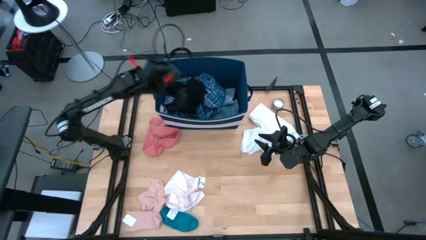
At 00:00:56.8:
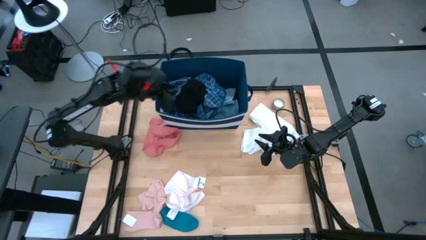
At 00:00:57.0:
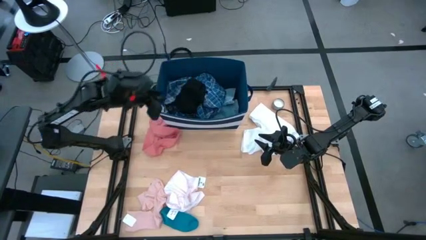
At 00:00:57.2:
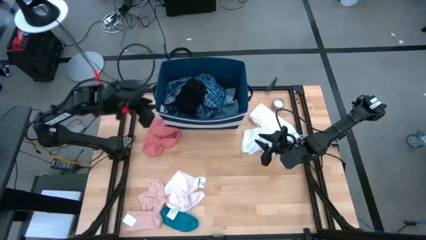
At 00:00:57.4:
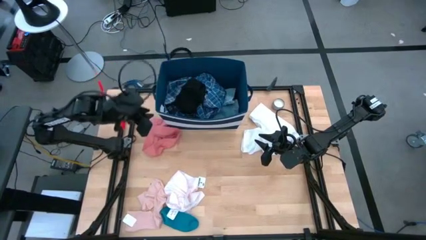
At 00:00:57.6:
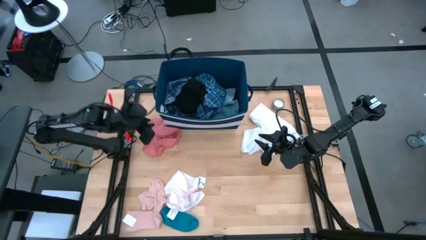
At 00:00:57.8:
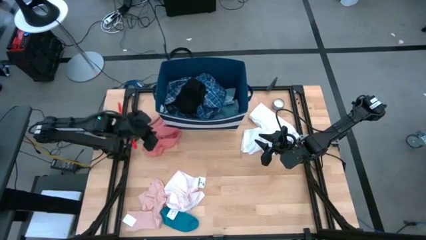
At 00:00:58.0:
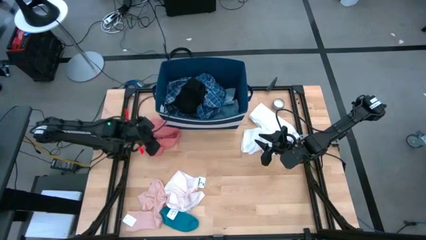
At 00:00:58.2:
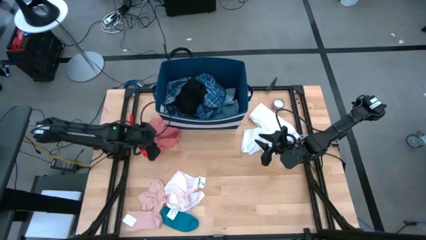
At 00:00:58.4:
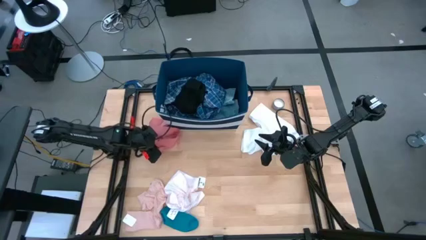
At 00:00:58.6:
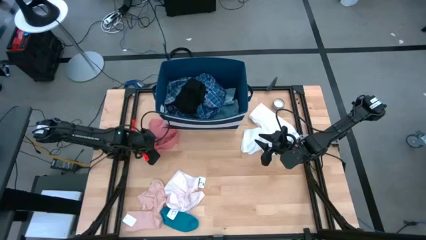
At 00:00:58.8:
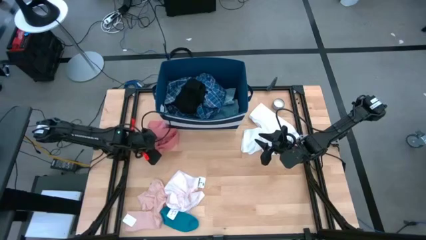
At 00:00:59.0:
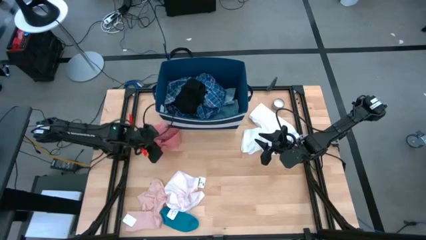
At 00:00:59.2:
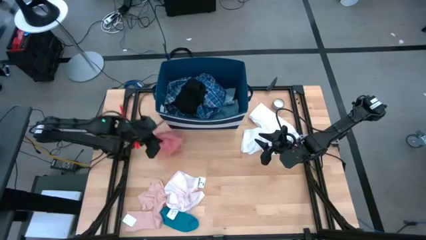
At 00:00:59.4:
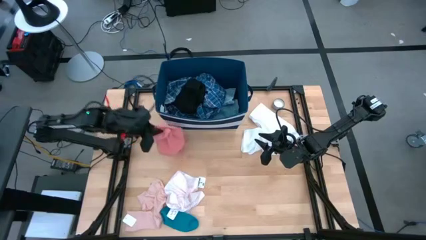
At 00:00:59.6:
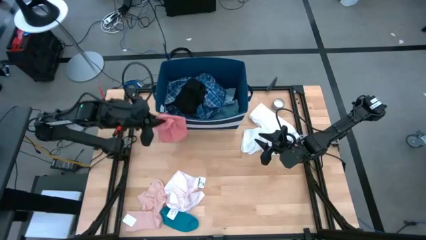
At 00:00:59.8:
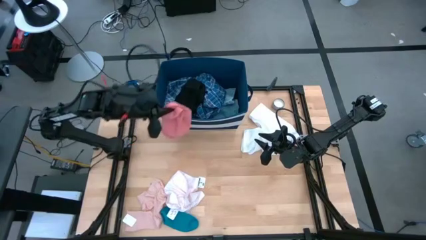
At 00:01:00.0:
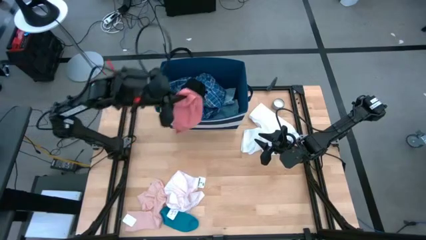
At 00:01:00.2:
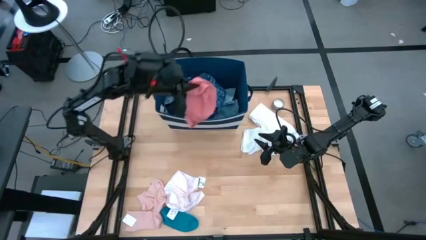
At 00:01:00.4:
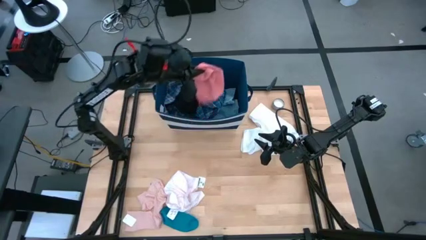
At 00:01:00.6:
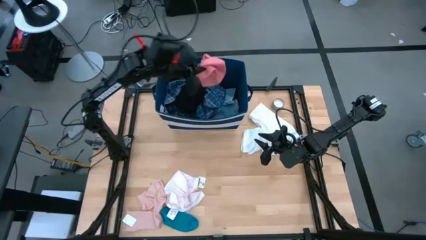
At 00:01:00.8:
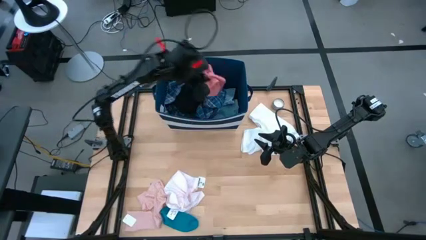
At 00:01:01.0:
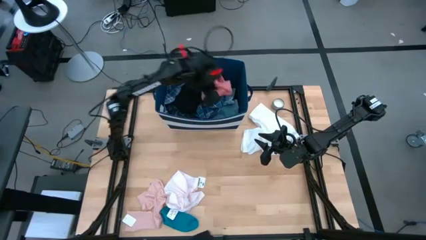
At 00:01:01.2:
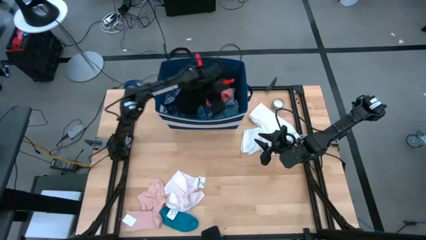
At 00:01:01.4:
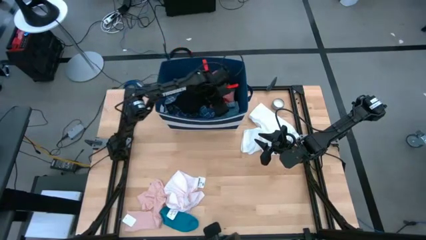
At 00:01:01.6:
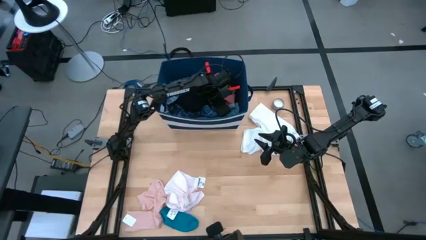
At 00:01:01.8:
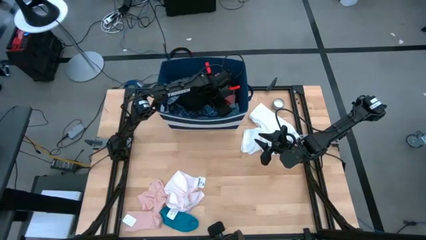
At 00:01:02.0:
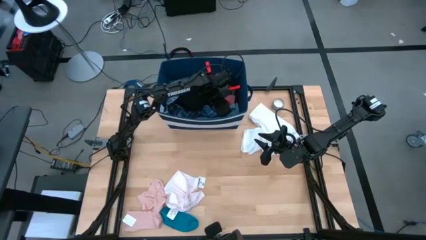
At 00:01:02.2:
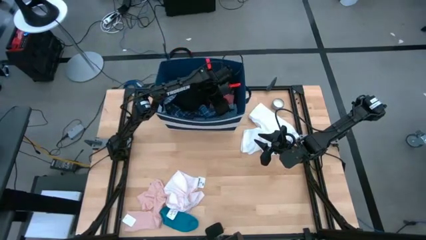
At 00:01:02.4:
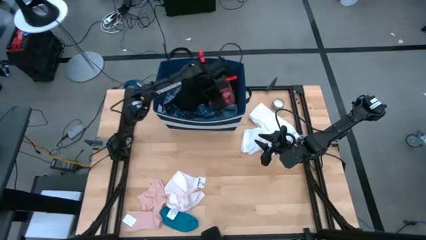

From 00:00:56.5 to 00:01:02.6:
Task: Sort clothes
Put the pink underwear into the blue laundry bin

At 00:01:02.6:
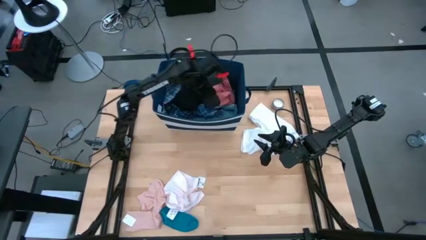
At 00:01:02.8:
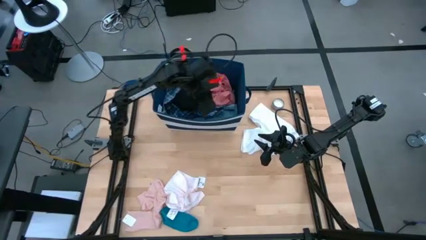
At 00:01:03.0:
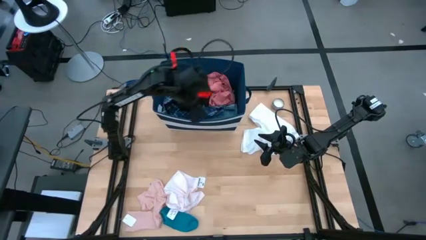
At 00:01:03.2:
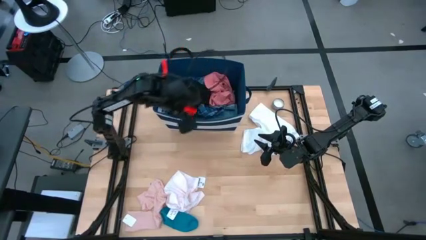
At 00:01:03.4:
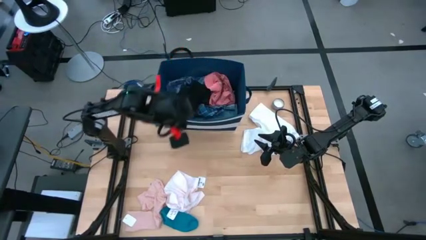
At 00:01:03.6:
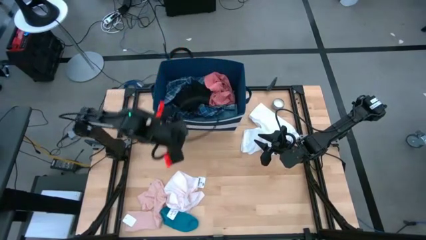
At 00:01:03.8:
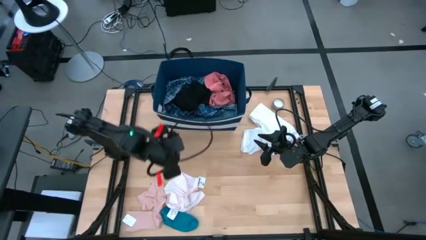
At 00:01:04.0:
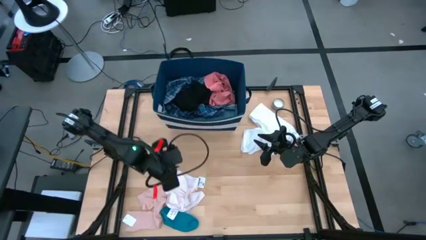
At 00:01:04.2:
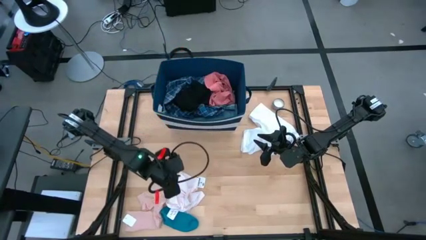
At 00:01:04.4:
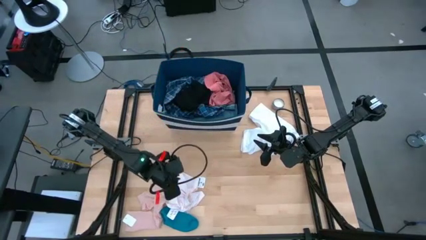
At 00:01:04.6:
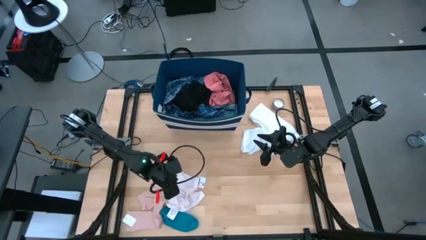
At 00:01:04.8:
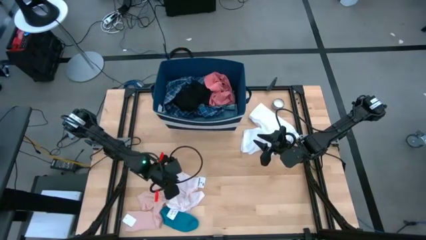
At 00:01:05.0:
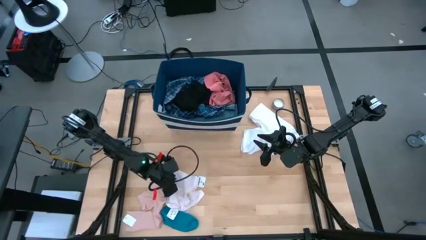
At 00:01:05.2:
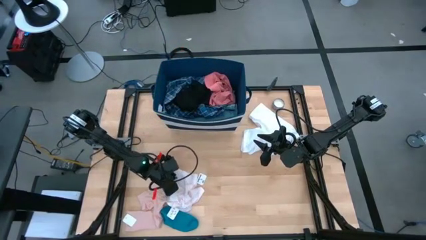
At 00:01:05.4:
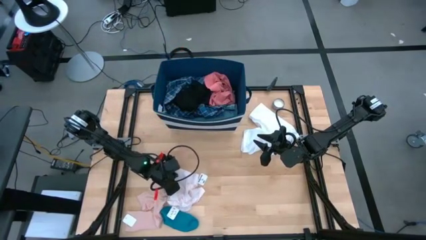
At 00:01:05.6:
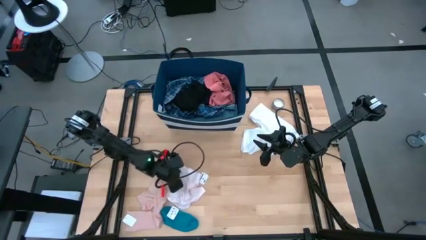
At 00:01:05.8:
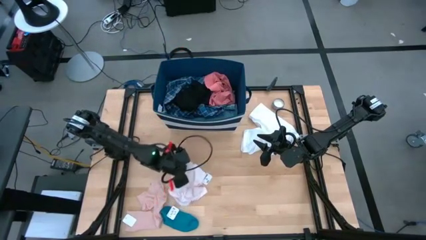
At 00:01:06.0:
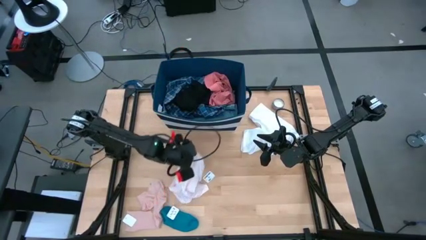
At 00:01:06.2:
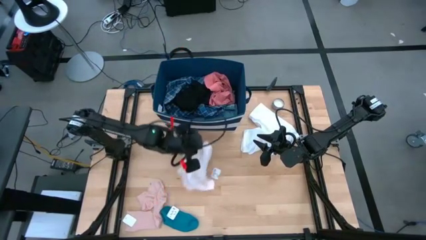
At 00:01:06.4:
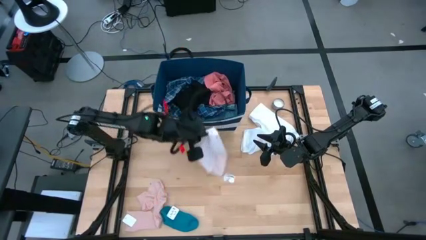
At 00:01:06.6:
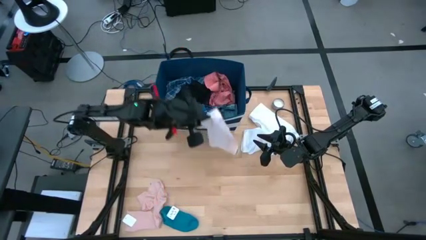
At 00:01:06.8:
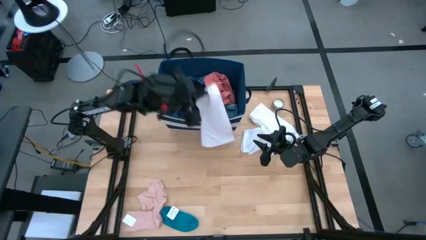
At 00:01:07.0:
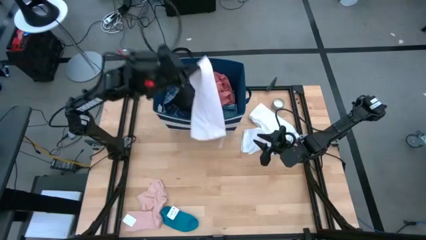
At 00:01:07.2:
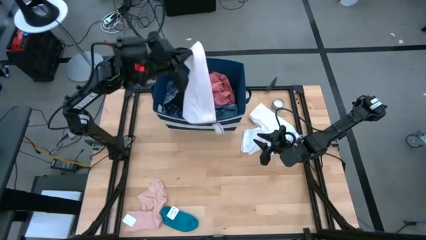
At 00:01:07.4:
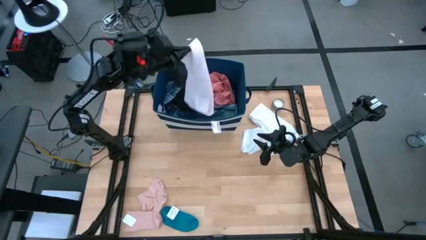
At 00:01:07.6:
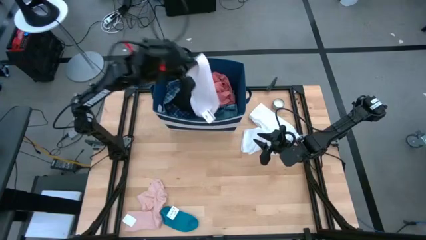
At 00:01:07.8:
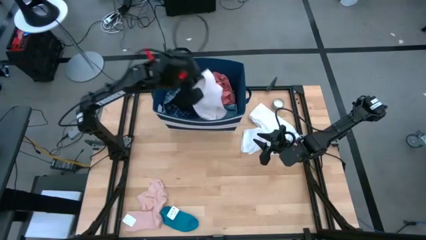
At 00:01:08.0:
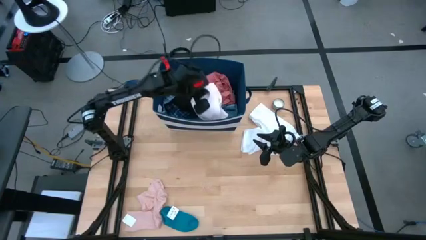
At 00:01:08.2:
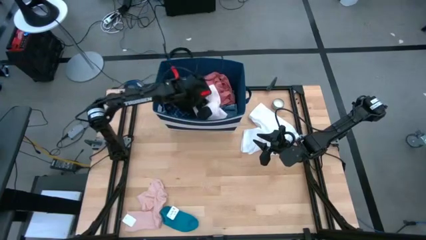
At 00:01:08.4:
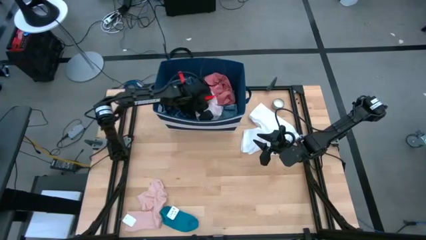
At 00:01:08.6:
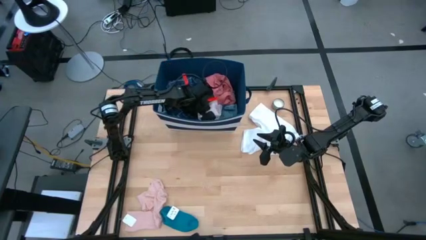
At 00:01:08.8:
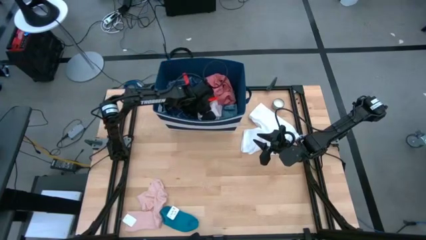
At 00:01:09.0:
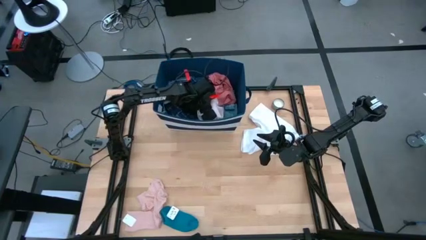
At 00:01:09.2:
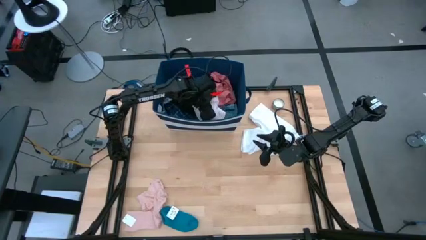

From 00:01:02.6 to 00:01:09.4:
Put the light pink underwear into the blue laundry bin

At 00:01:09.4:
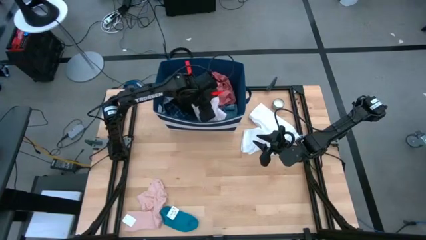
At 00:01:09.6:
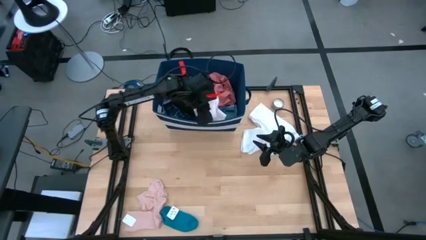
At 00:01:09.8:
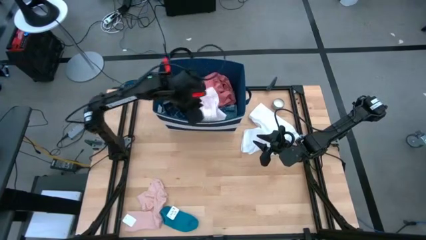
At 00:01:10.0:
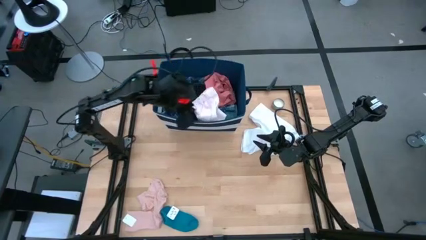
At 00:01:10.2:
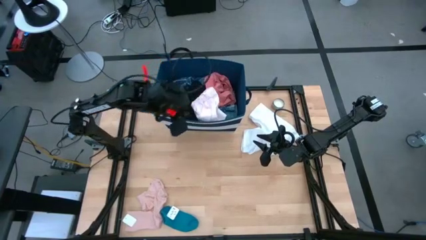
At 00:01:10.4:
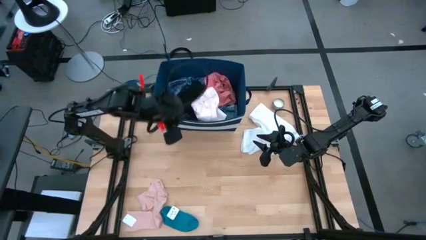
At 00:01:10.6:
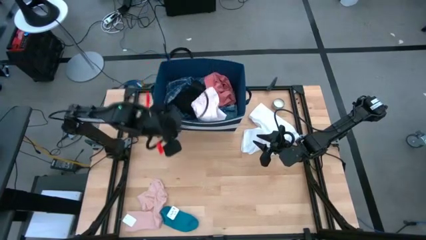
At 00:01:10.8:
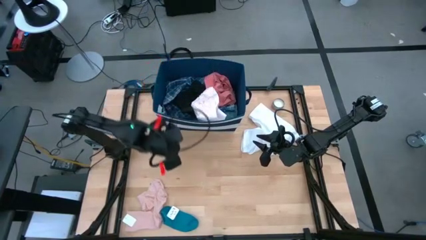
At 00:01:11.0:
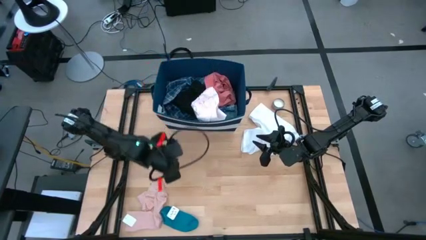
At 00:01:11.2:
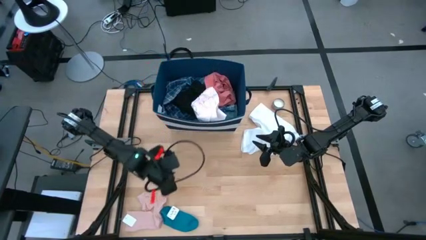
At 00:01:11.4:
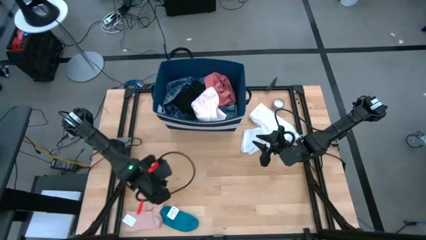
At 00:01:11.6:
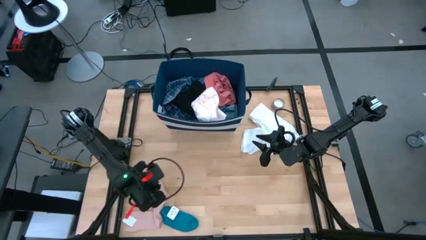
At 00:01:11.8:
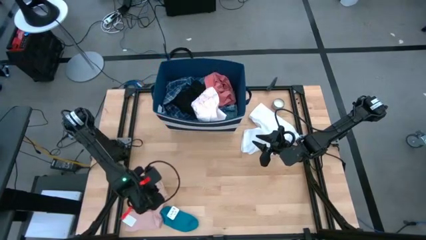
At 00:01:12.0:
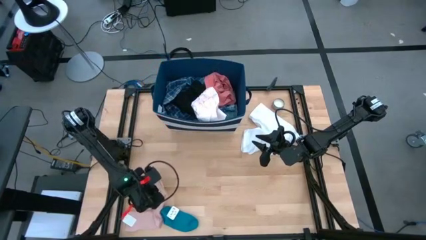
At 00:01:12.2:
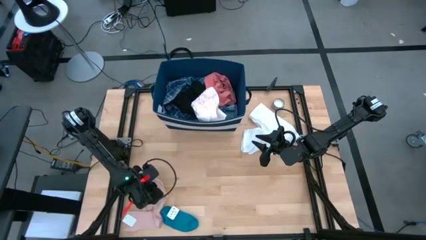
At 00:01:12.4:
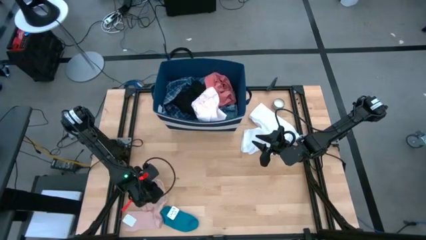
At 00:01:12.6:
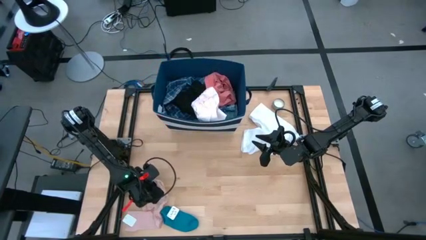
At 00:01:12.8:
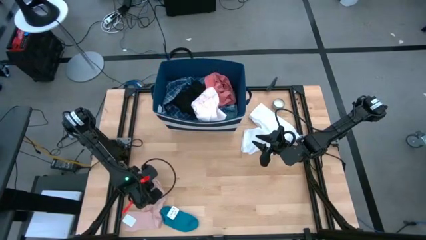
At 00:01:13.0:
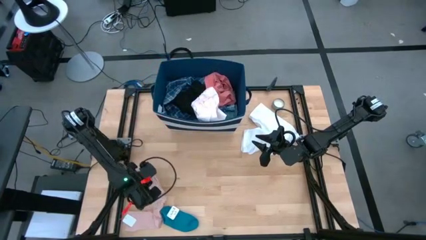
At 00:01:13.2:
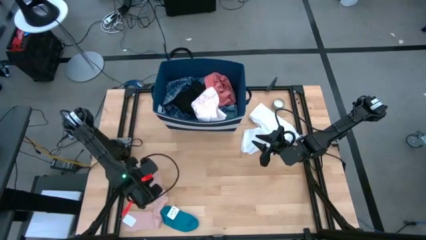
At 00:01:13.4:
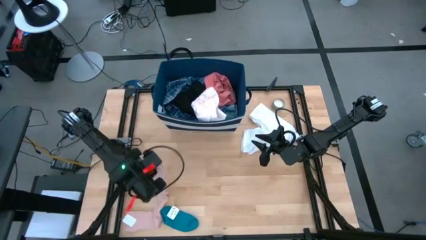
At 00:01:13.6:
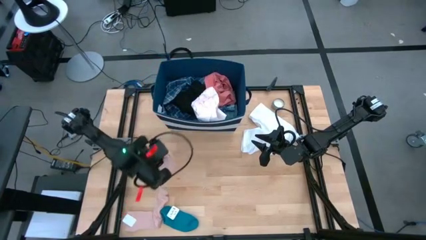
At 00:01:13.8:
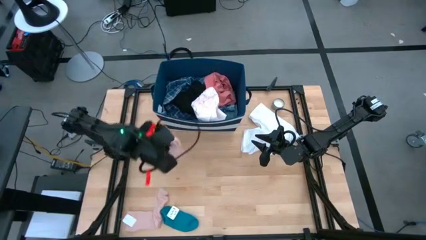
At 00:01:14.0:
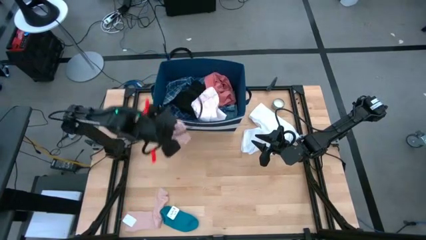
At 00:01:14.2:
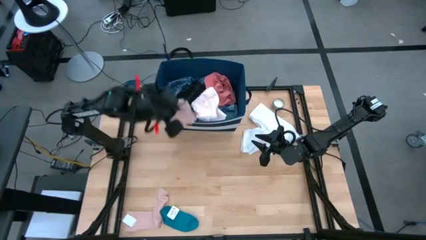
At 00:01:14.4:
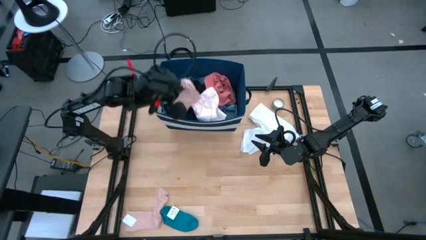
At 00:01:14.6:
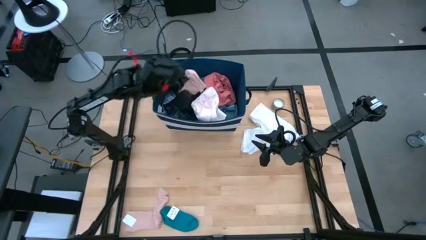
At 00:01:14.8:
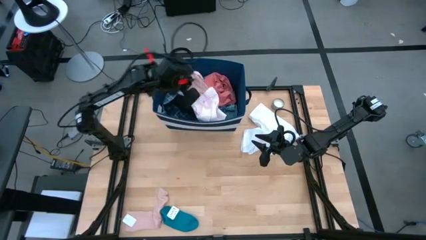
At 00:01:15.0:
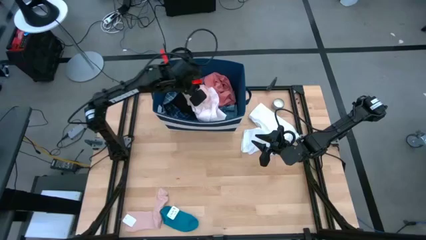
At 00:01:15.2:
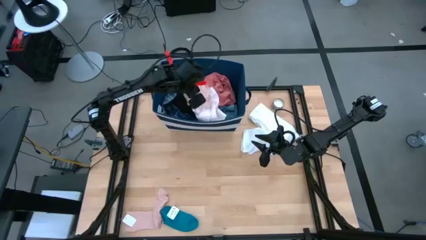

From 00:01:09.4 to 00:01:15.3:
Put the pink sock into the blue laundry bin
